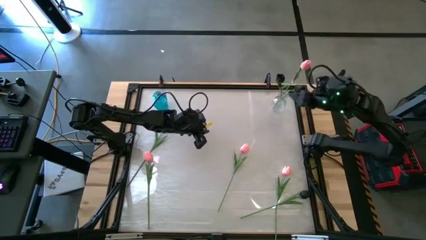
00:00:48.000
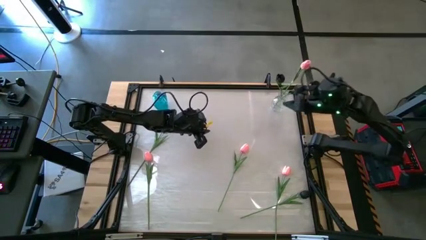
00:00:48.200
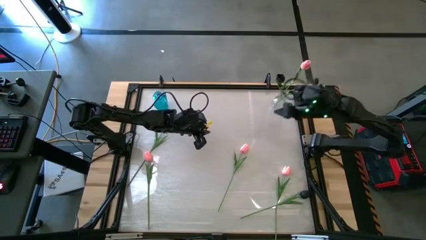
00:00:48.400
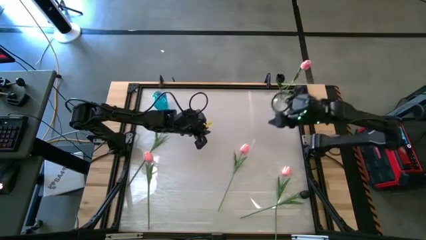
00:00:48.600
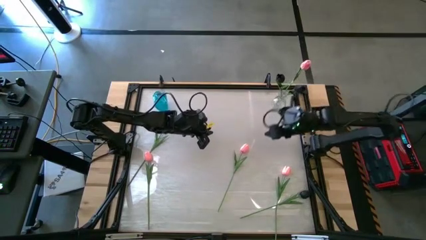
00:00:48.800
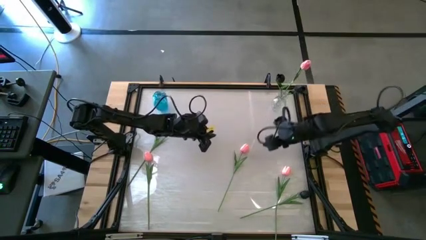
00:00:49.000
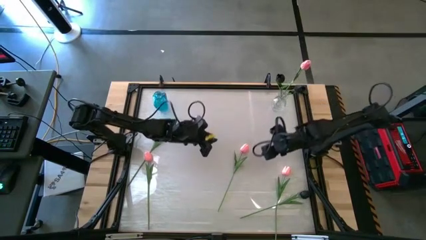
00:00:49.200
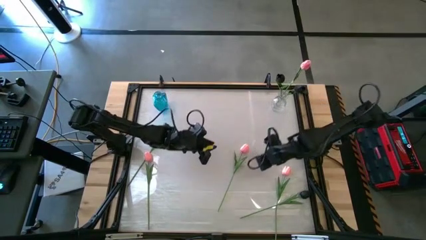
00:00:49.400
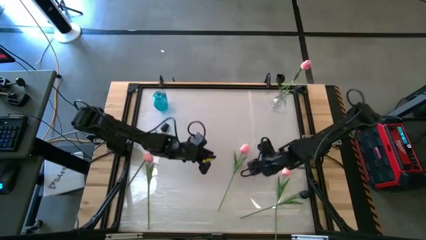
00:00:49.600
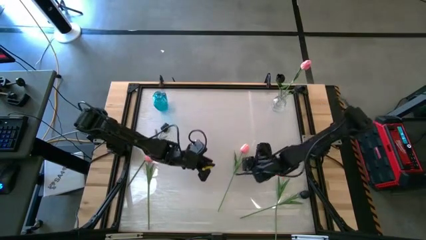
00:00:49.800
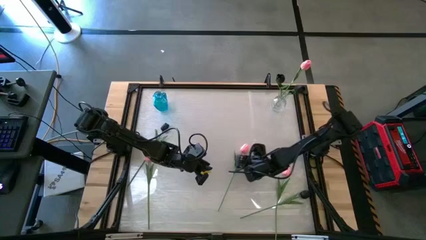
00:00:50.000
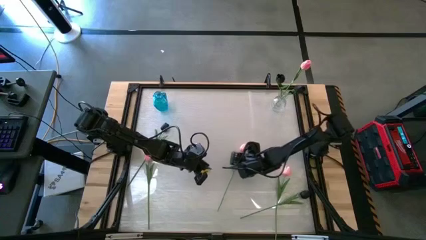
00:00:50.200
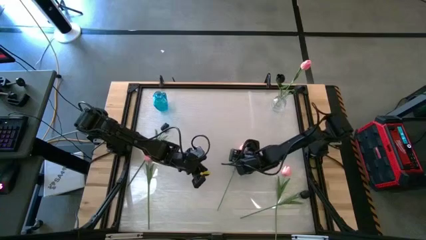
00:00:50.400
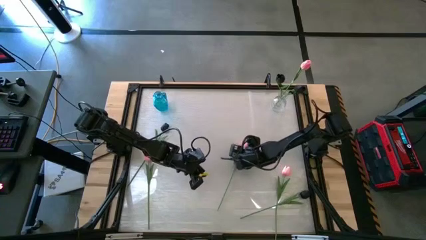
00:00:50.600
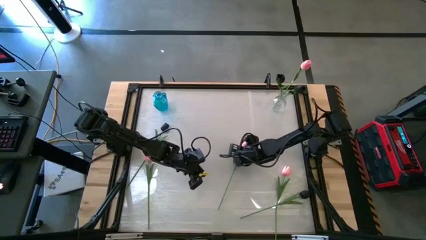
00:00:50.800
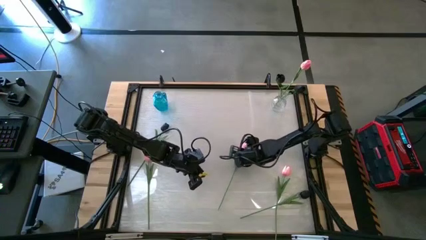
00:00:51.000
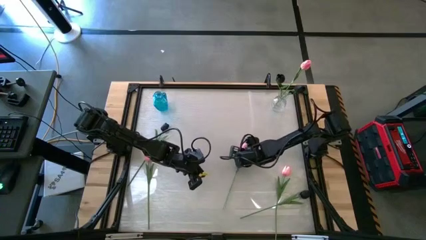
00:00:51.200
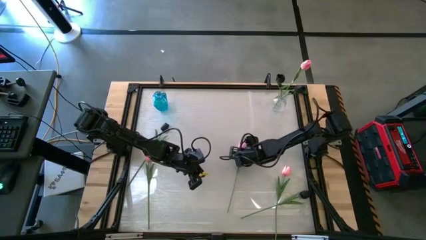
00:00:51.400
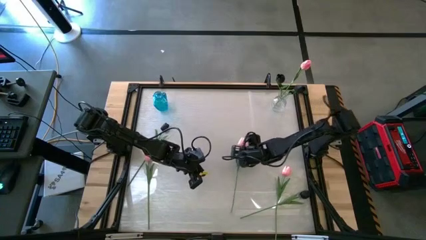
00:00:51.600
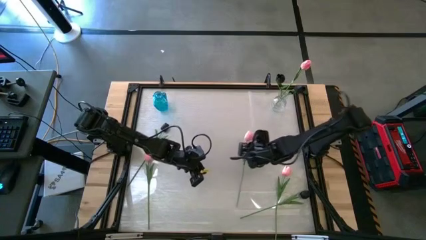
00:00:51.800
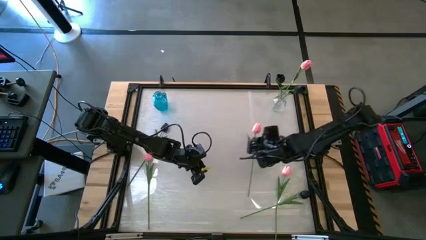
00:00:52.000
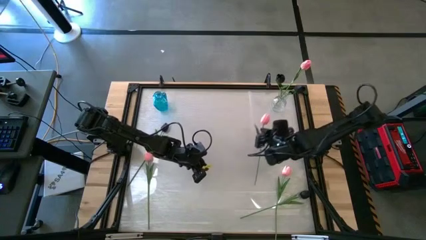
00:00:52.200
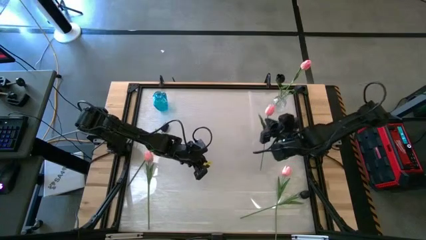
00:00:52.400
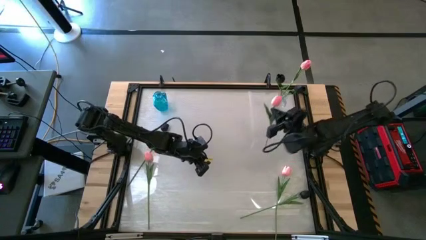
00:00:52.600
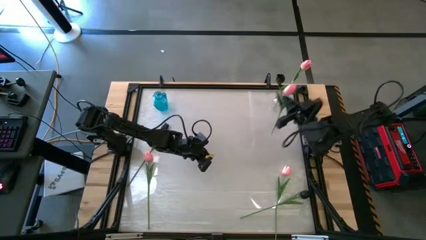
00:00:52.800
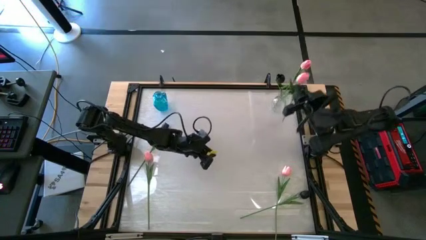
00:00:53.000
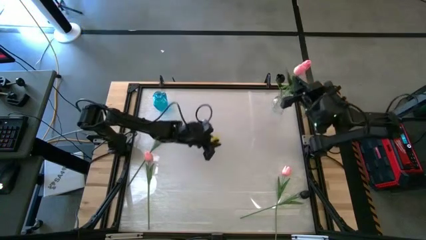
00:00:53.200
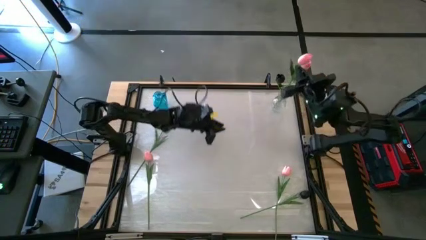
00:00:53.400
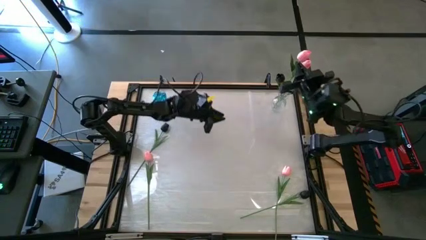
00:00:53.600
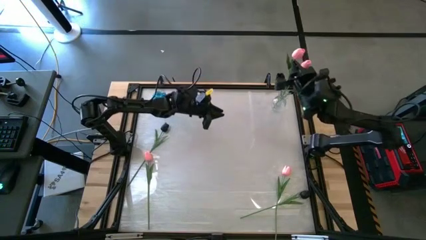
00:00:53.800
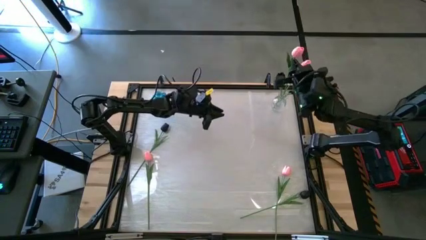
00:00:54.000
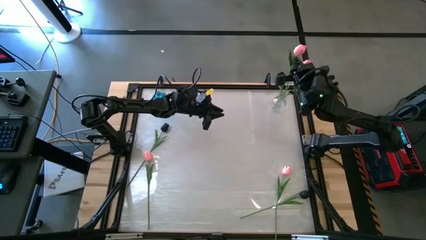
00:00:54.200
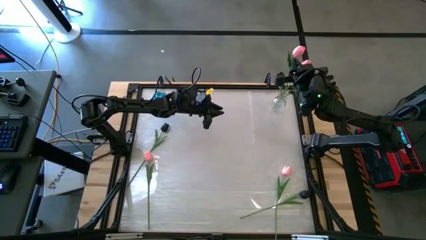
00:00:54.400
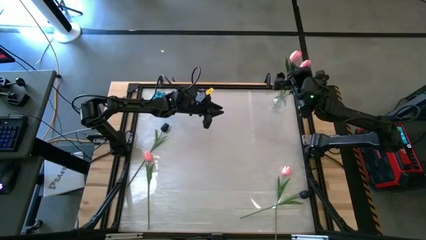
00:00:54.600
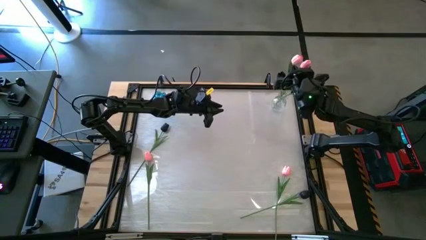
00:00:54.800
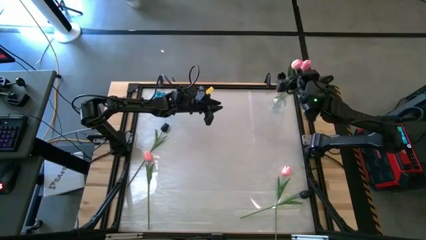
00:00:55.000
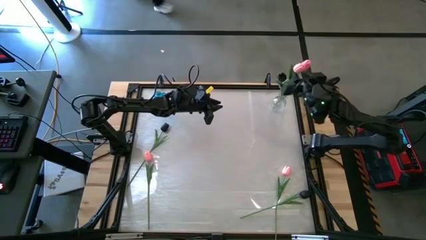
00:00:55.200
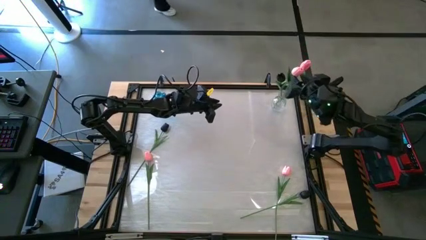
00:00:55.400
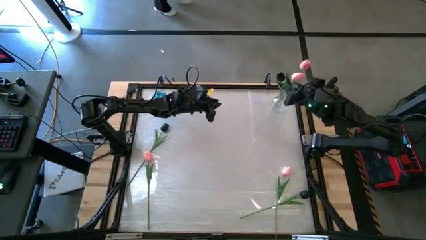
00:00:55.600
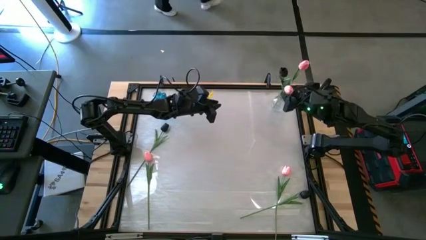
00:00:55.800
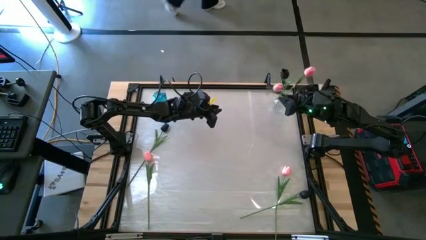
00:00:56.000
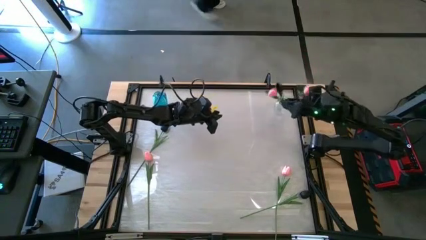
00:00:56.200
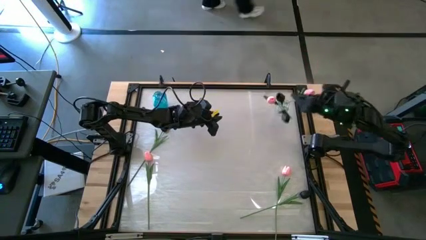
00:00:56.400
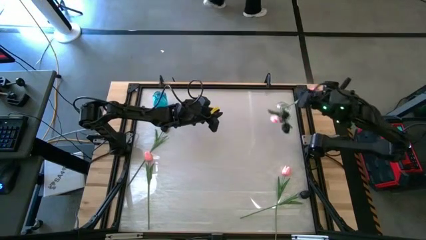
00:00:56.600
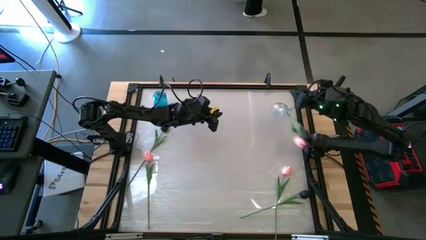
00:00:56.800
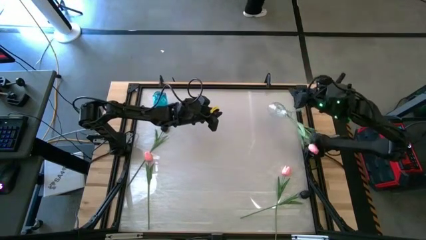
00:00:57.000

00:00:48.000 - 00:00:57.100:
Task: Sort flowers into vase by color
Put the pink flower into the transparent vase
